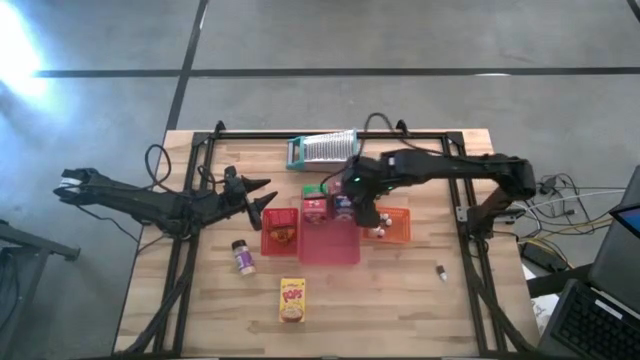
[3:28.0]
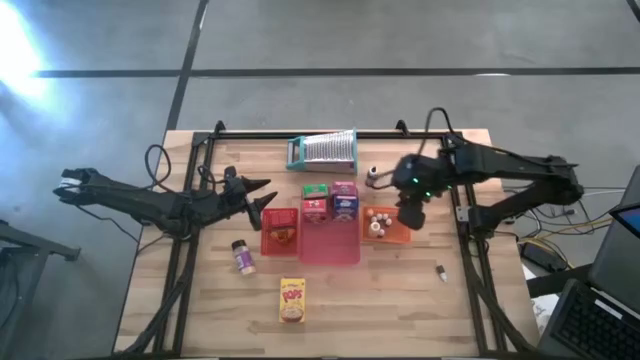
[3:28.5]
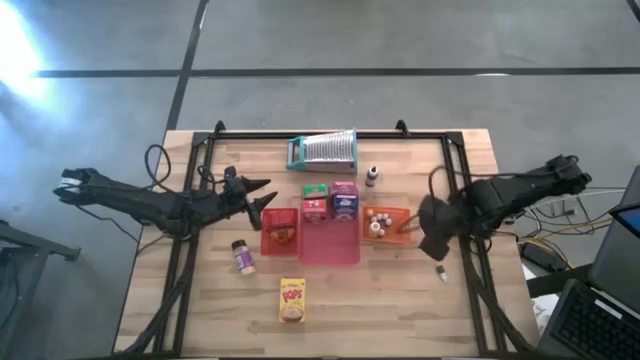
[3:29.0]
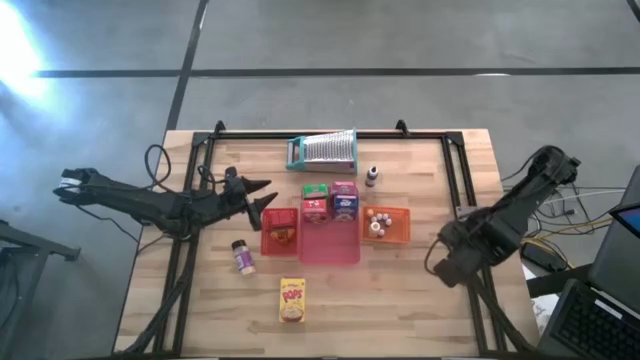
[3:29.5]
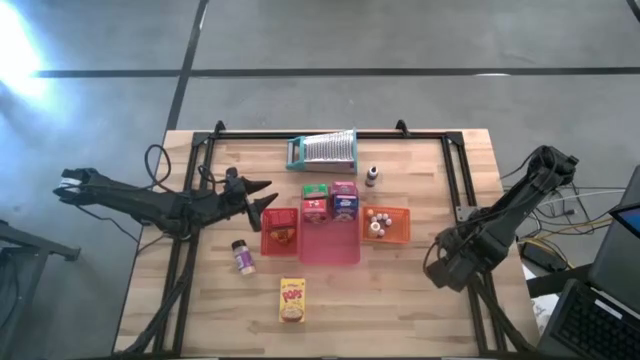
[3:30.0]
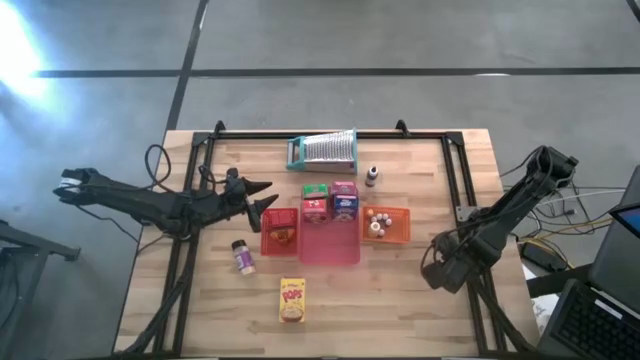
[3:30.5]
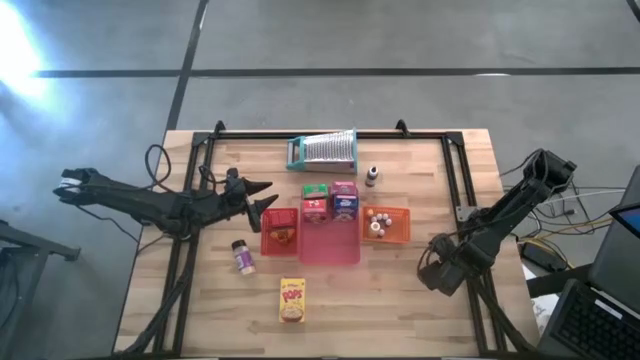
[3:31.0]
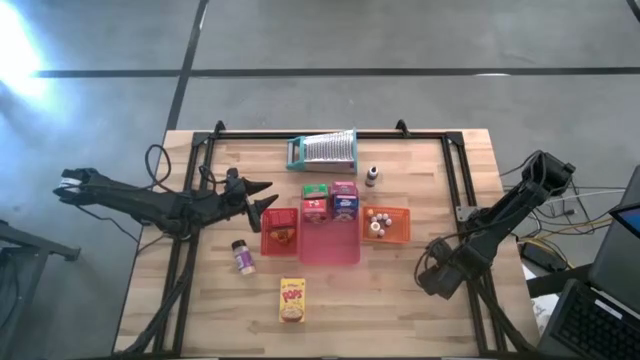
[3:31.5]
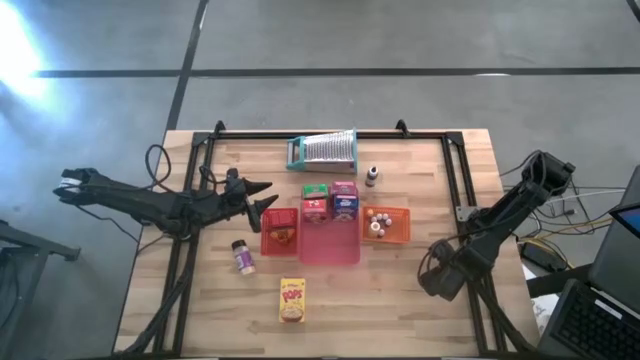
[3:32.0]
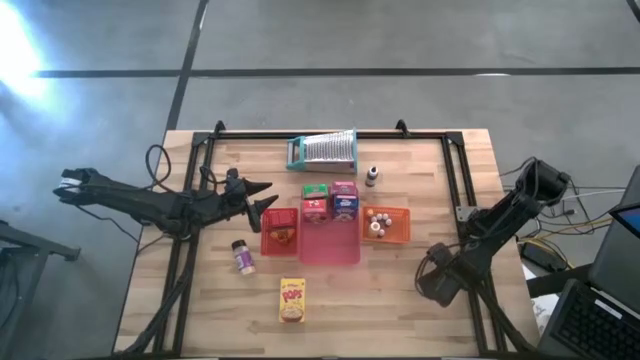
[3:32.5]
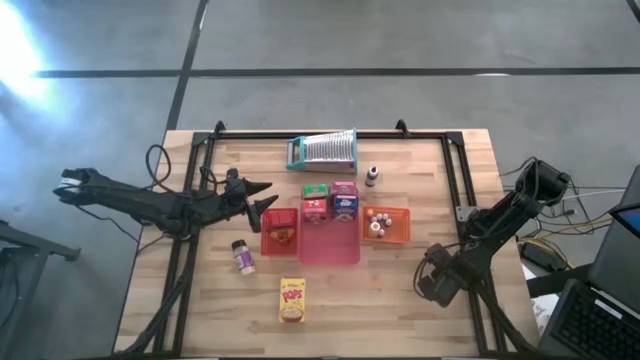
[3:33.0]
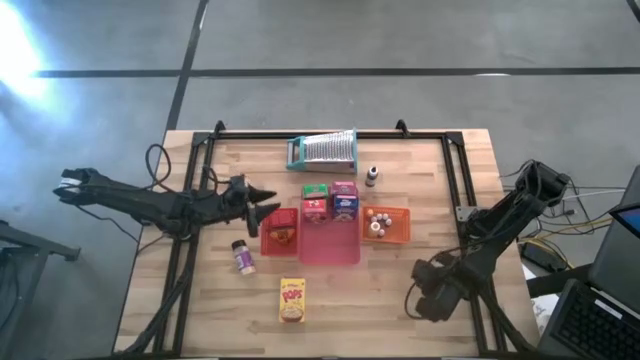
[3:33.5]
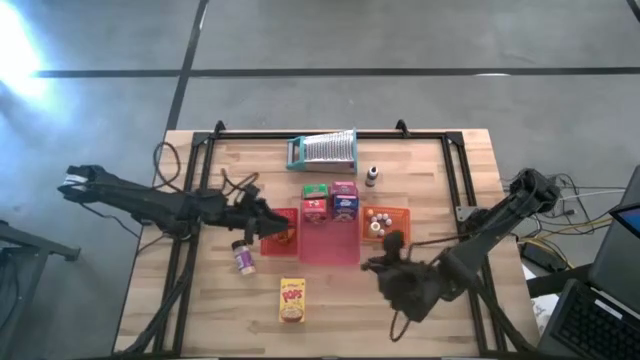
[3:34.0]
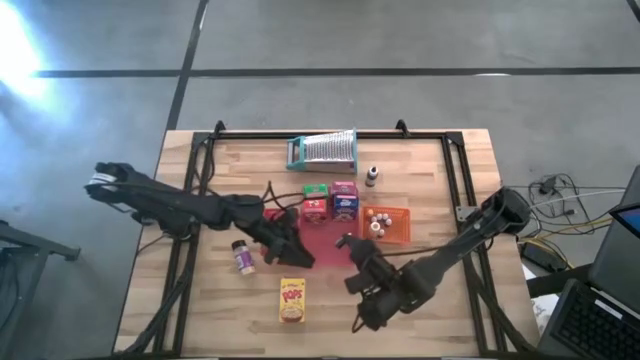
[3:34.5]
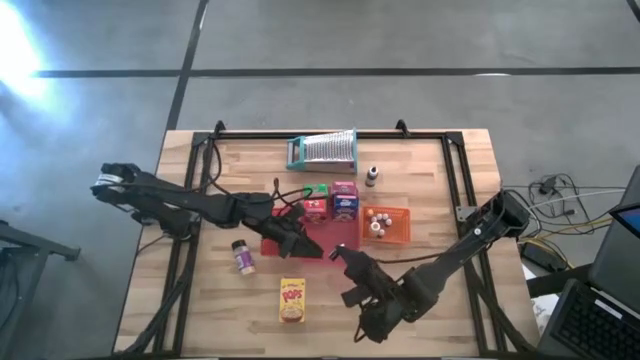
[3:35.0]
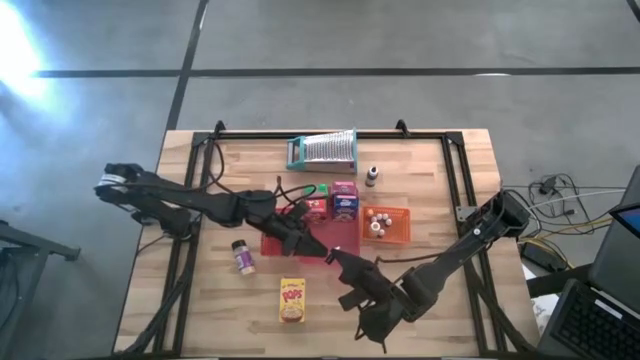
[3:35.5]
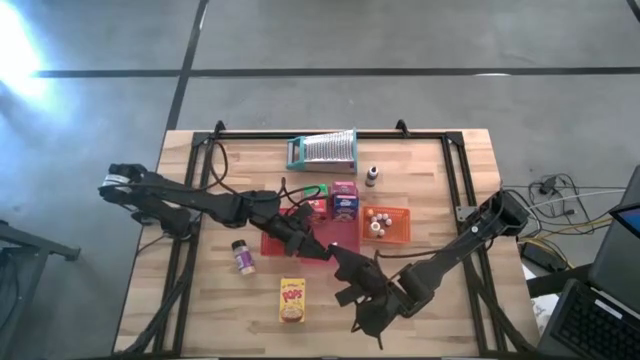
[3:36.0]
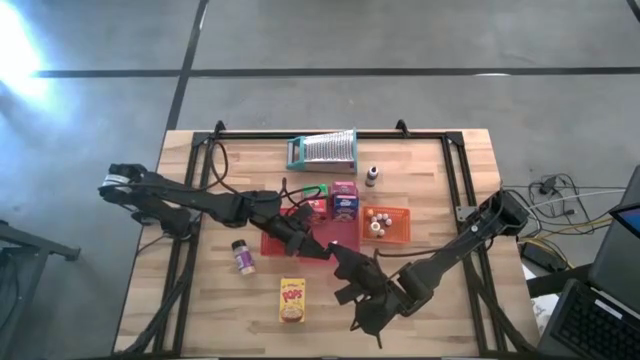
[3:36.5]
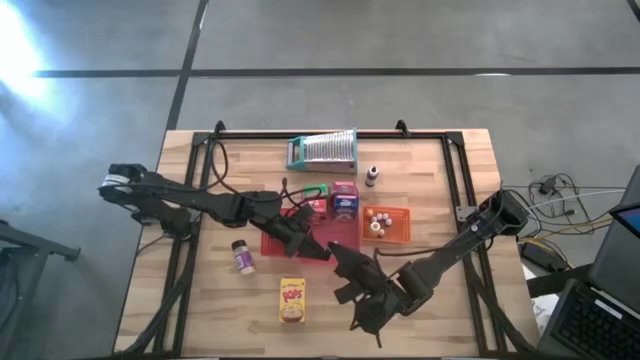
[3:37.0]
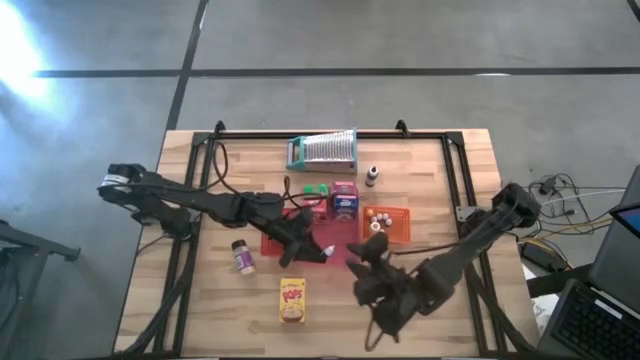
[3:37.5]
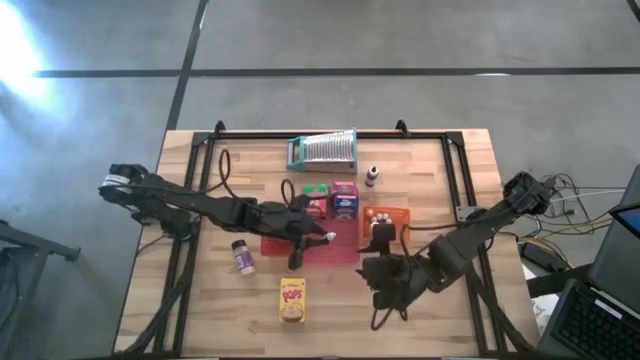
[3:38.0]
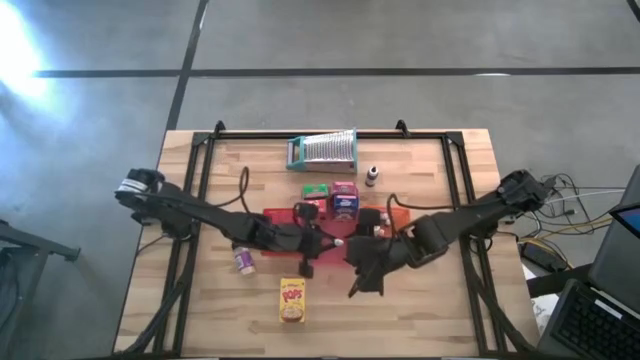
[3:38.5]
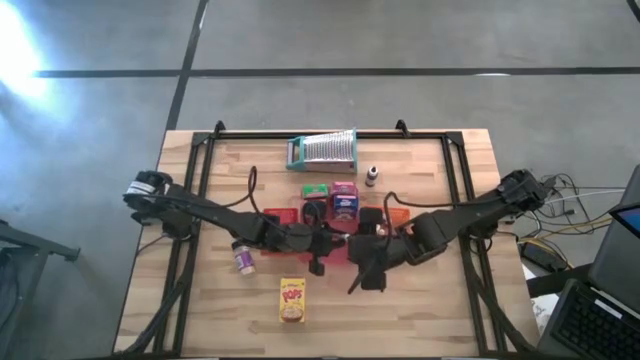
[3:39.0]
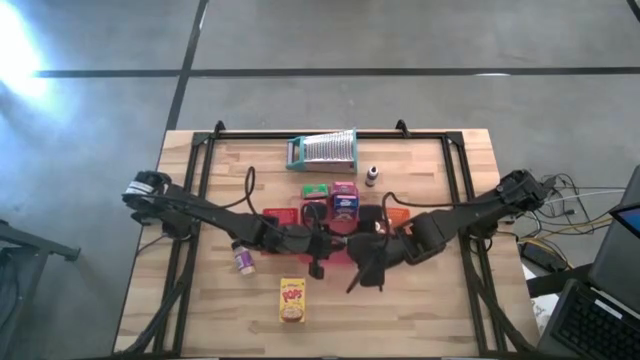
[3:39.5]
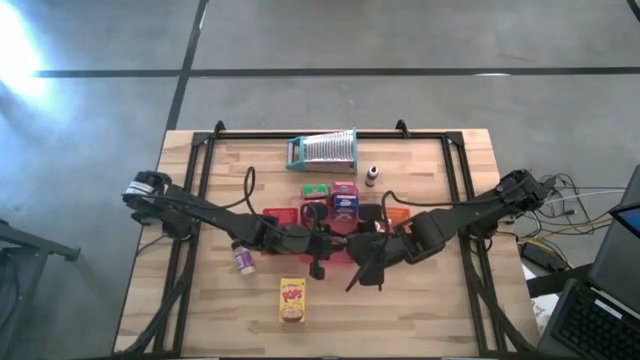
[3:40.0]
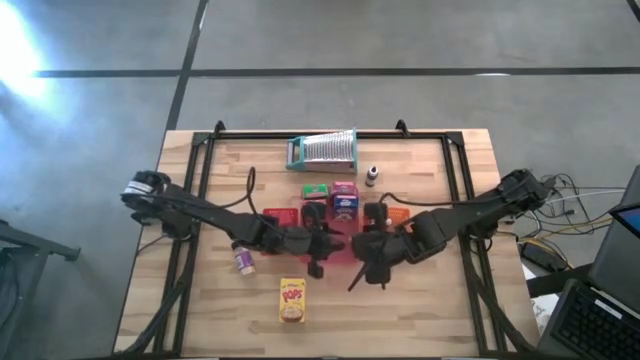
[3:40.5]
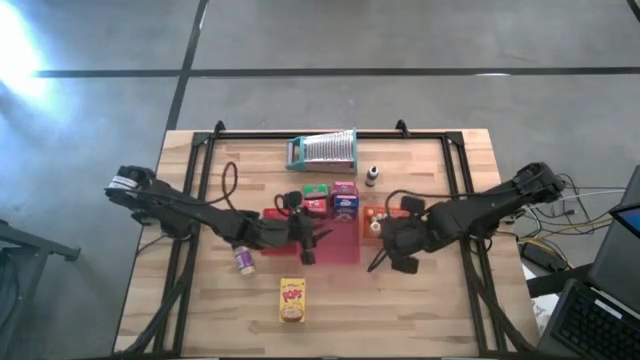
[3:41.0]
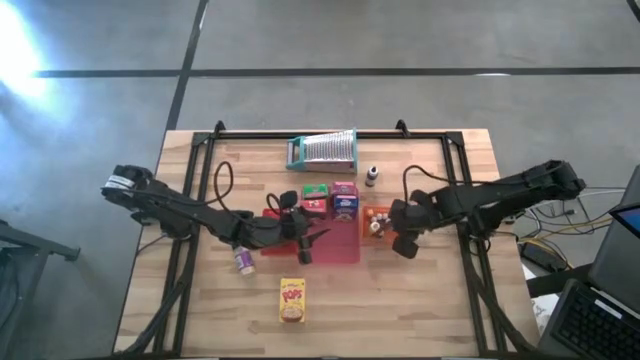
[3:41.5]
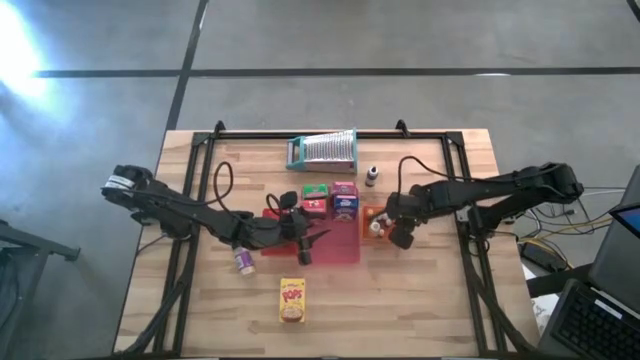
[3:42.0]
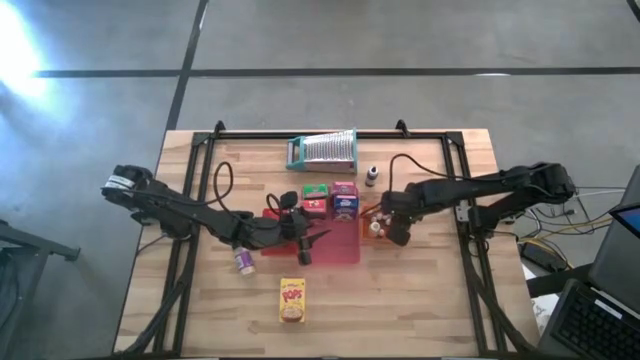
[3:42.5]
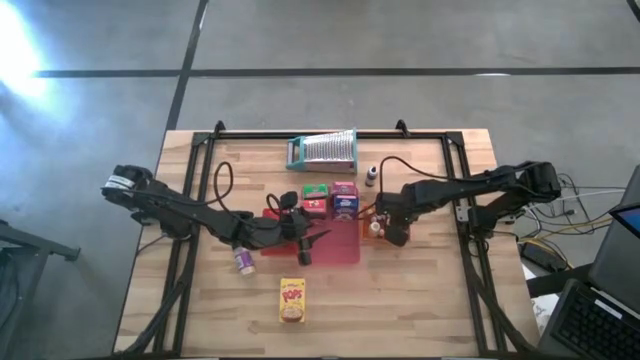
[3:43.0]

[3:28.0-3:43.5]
Task: Pick & Place Kitchen Items
Put the small brown food coloring bottle into the orange bin

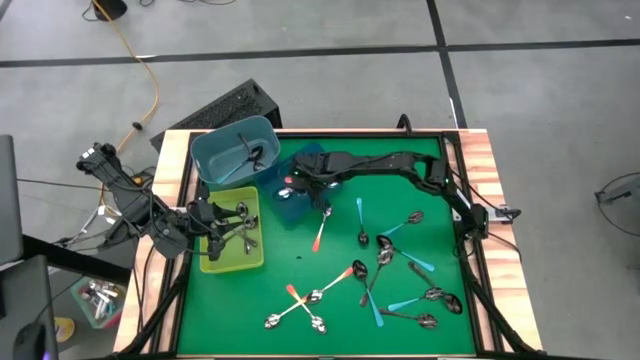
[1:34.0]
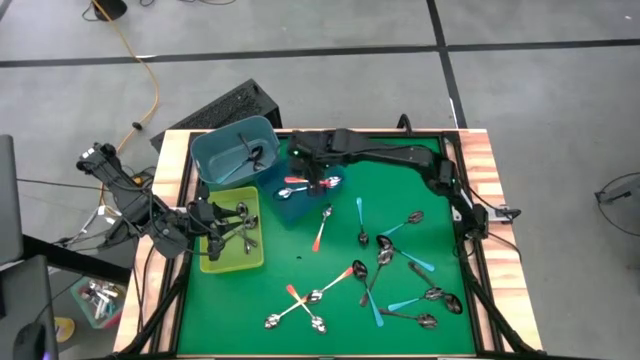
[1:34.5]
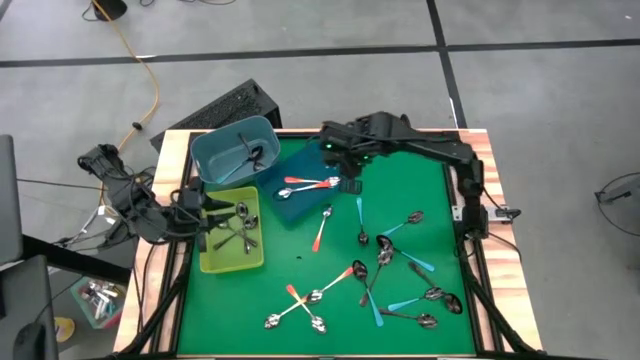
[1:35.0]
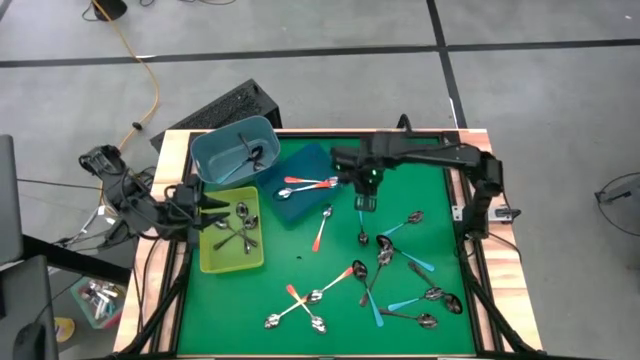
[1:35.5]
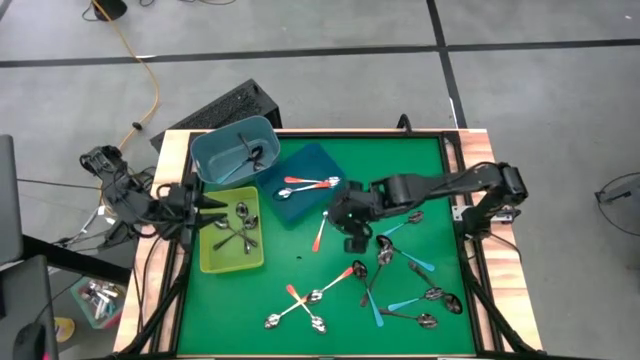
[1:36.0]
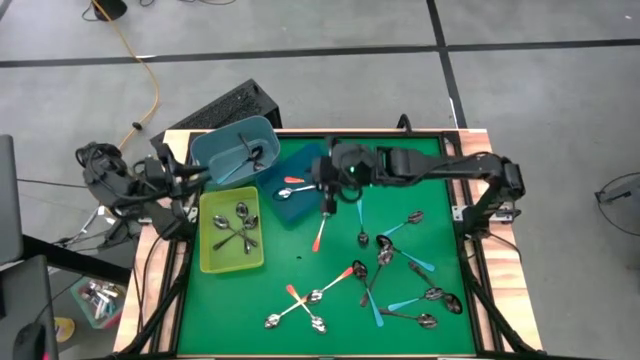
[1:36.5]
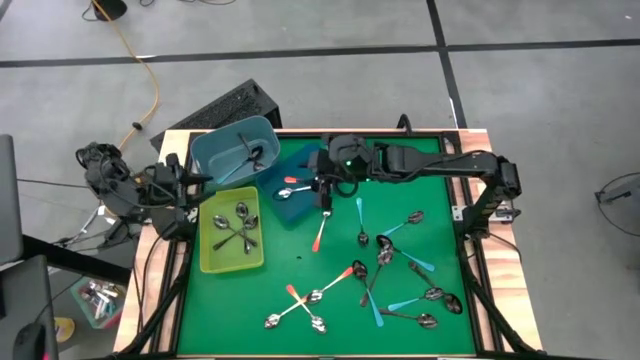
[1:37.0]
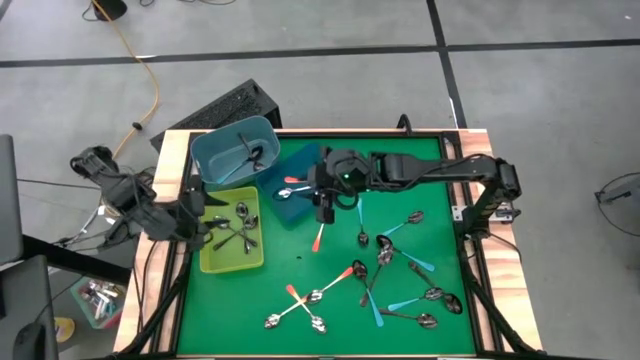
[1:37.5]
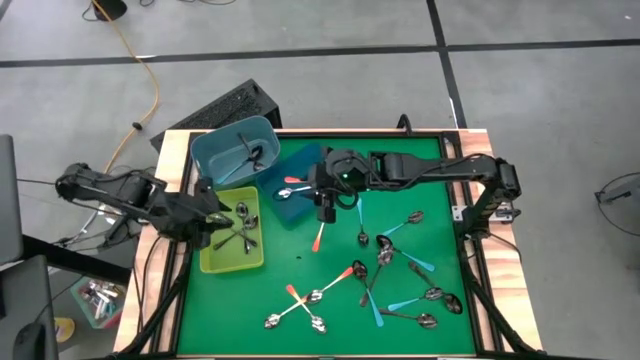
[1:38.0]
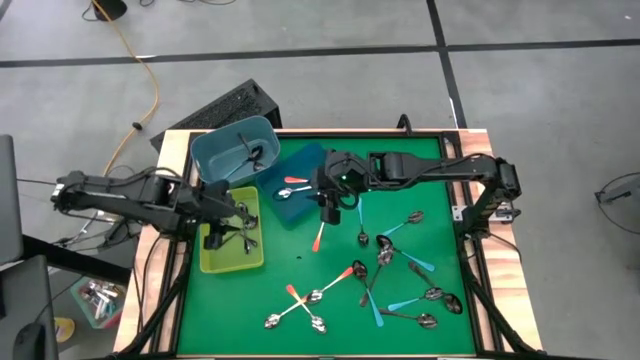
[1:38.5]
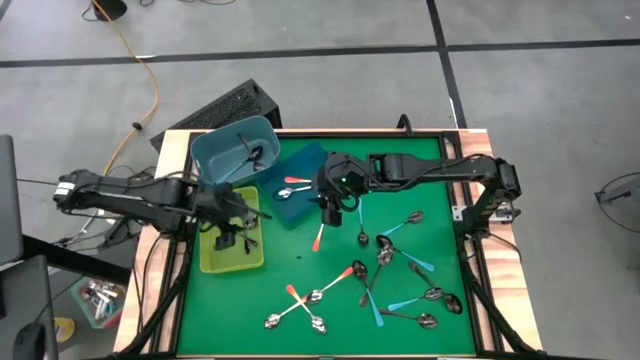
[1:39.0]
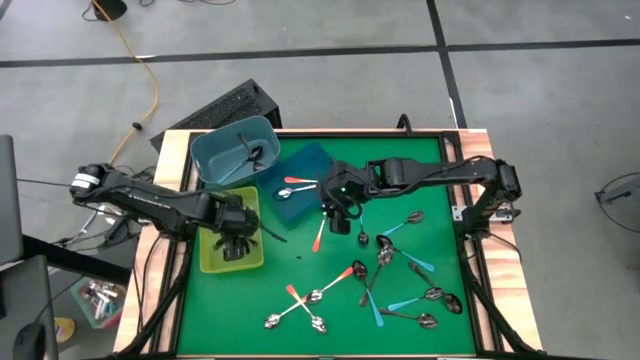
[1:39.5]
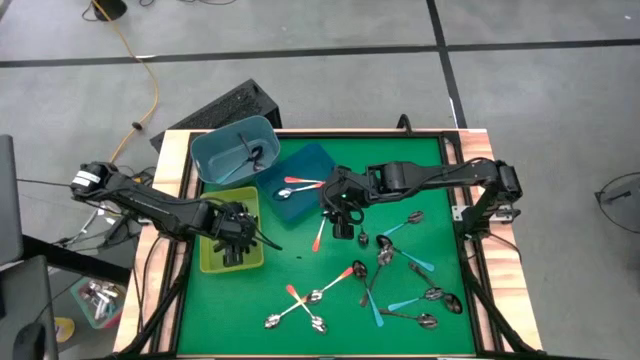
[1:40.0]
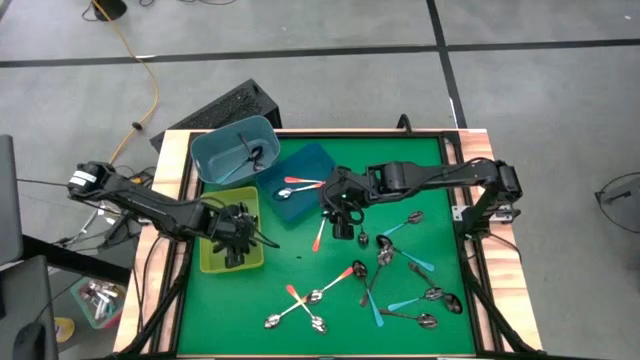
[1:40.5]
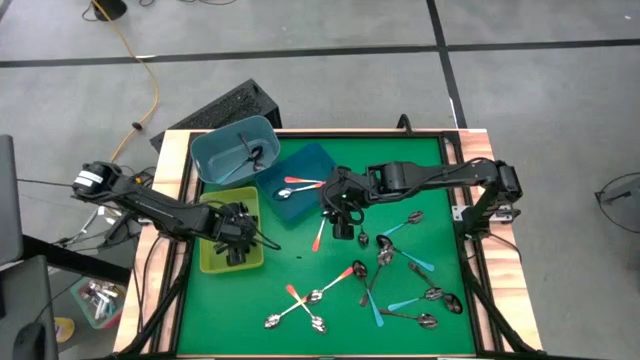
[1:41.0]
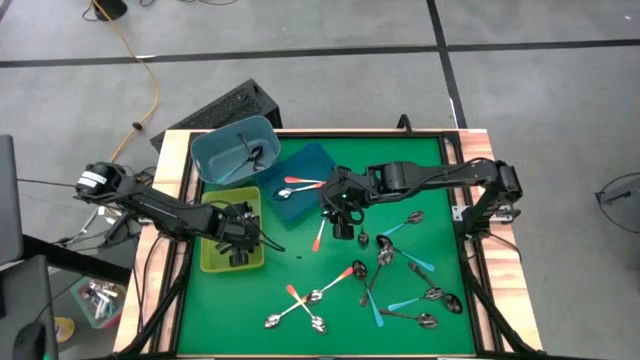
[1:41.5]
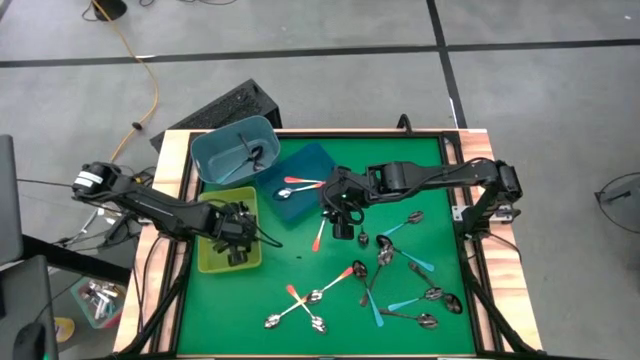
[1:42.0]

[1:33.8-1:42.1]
Task: Sort silverware by color (type)
Adjust the black spoon in the green bin
